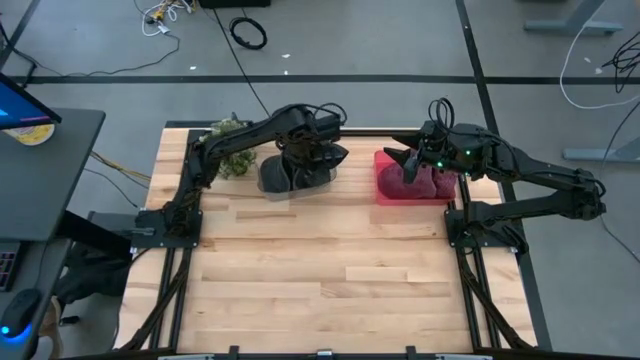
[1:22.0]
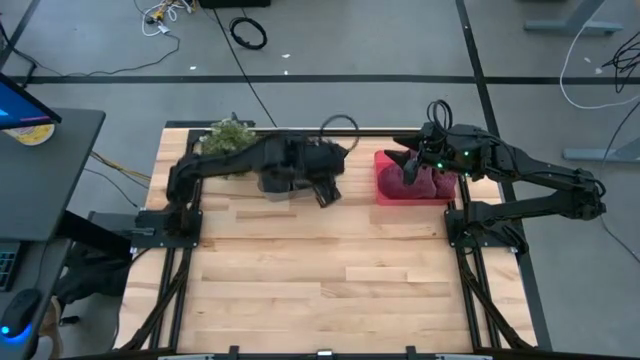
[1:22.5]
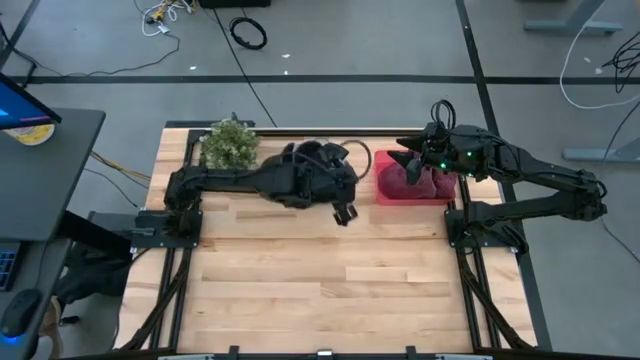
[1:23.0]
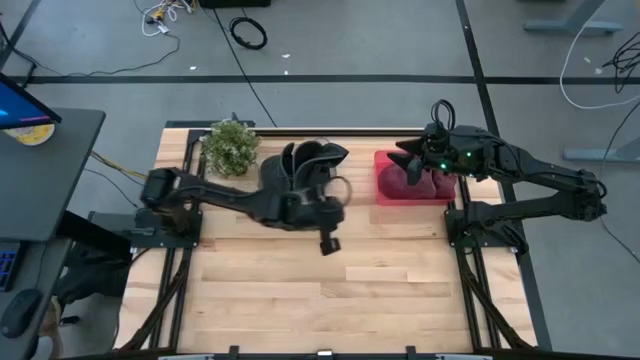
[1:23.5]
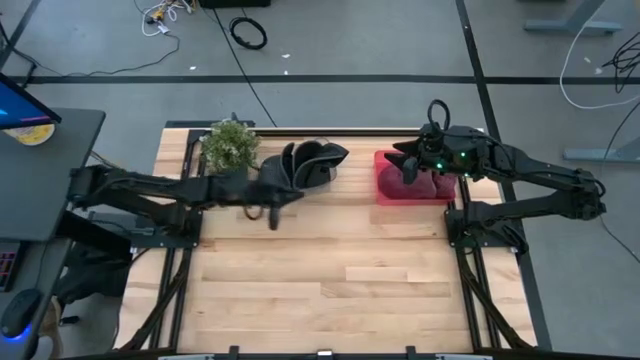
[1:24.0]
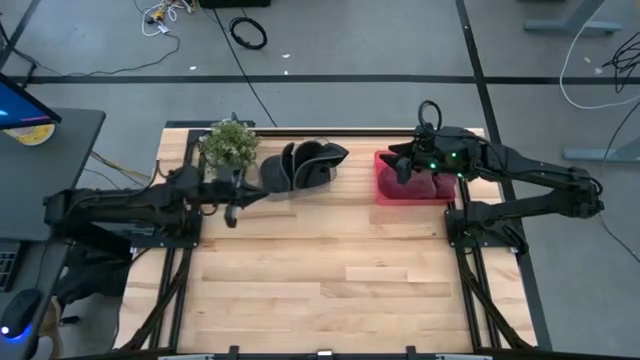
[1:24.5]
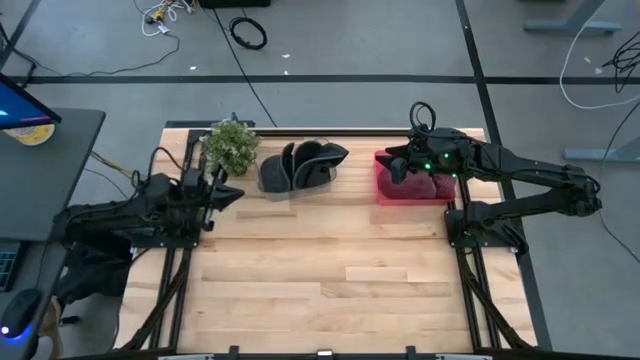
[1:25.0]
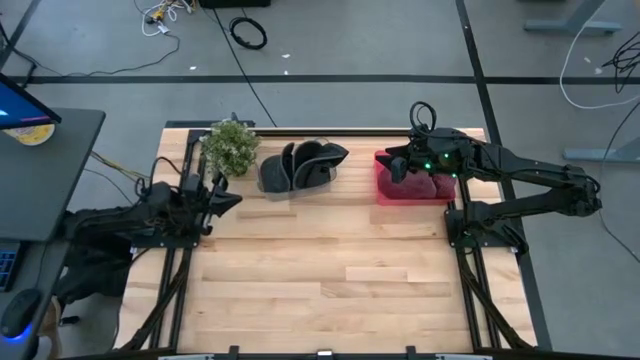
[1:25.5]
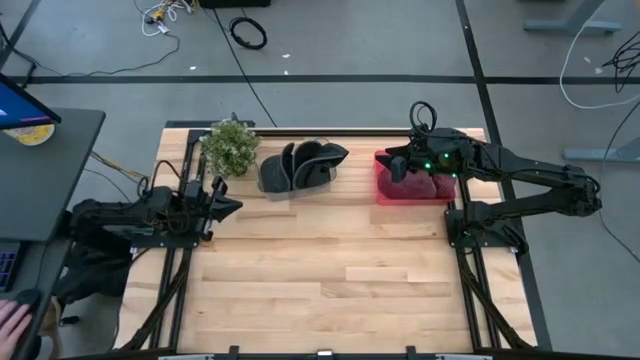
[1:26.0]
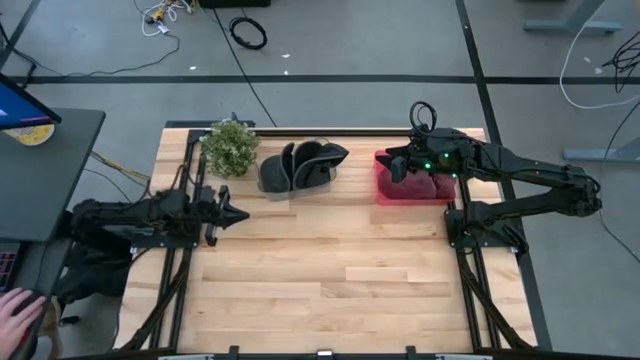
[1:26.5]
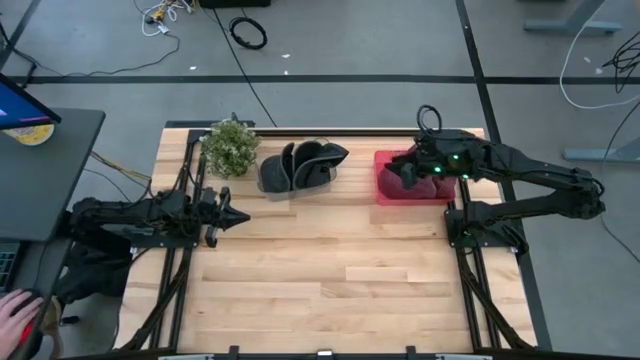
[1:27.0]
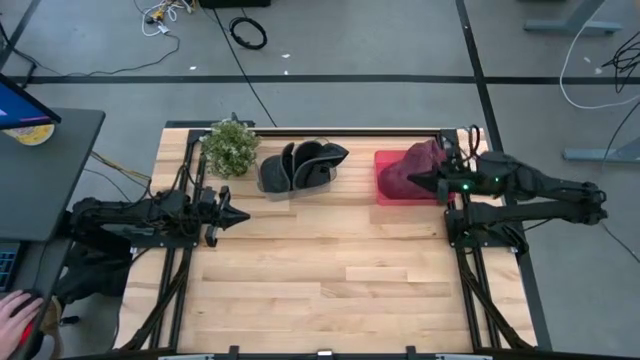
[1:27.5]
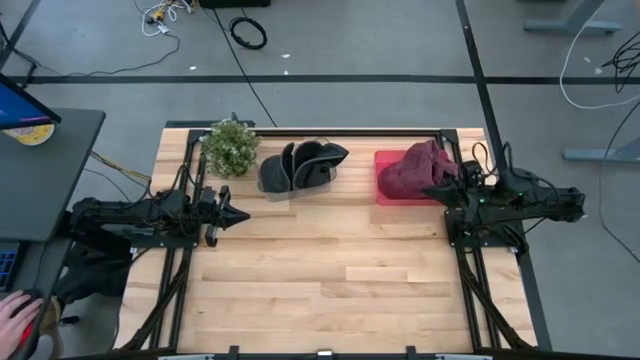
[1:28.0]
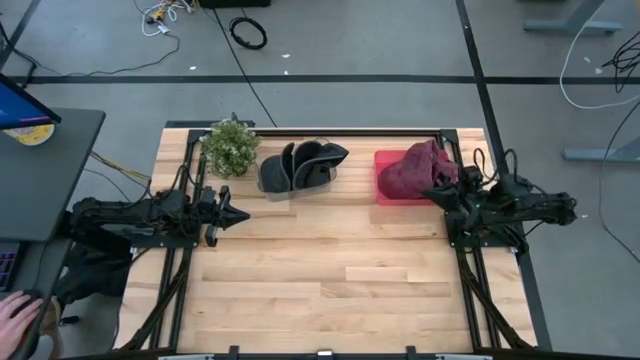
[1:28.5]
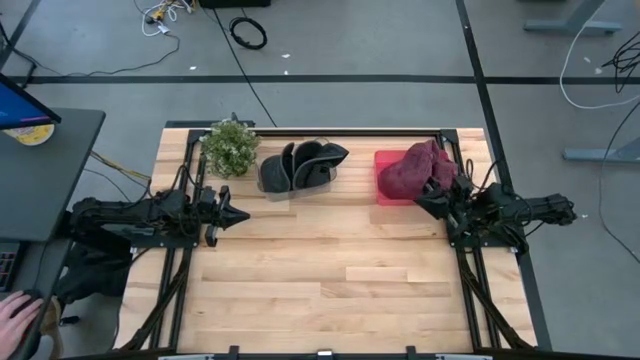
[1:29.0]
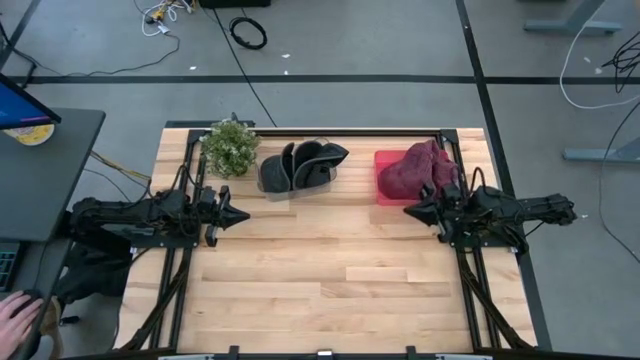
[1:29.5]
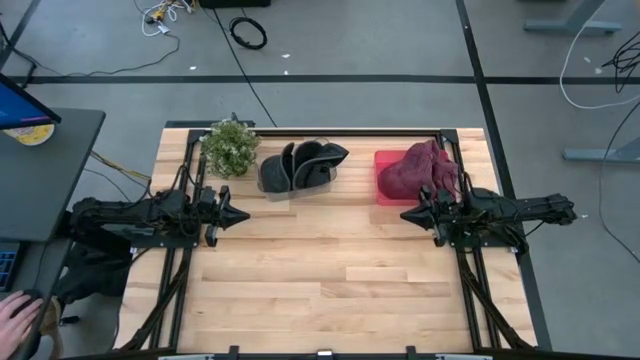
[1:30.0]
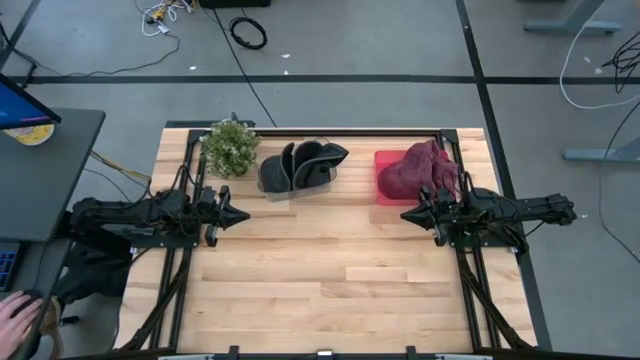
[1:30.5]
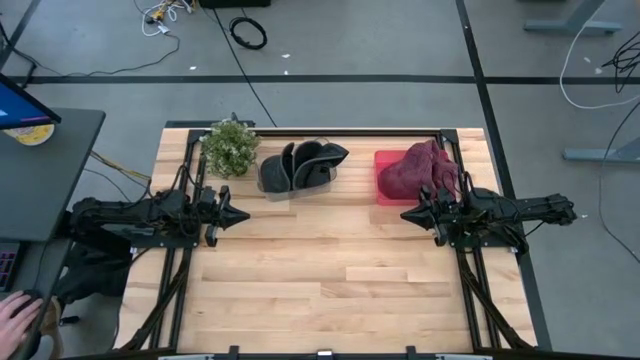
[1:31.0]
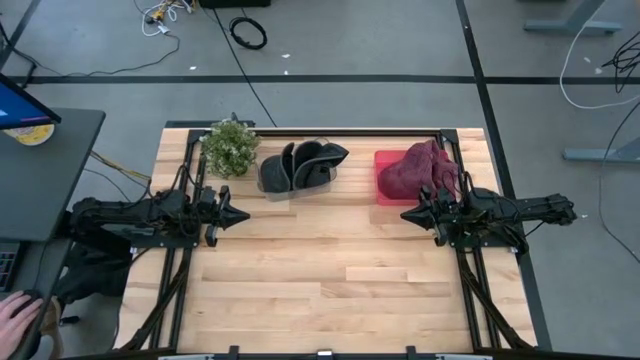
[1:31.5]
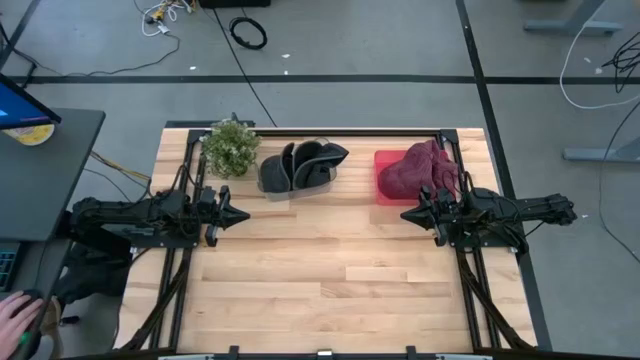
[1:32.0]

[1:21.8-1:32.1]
Task: Pick & Place hat
Return to Home Position
